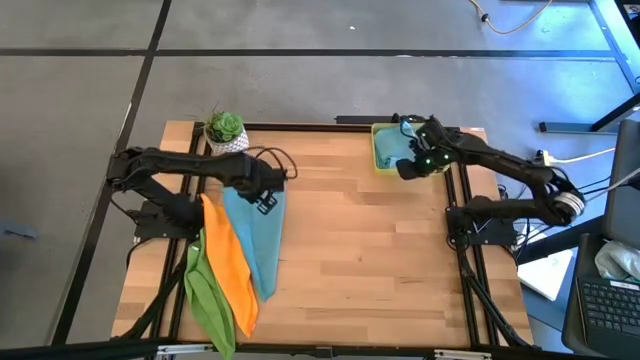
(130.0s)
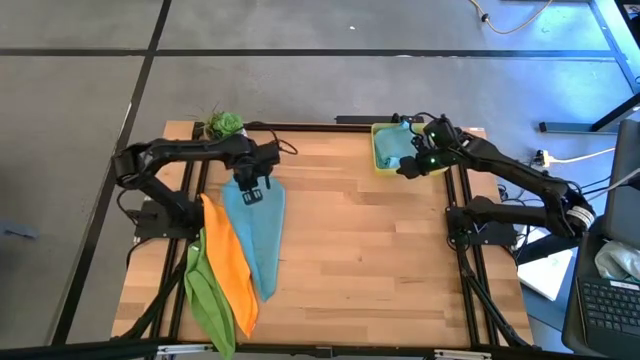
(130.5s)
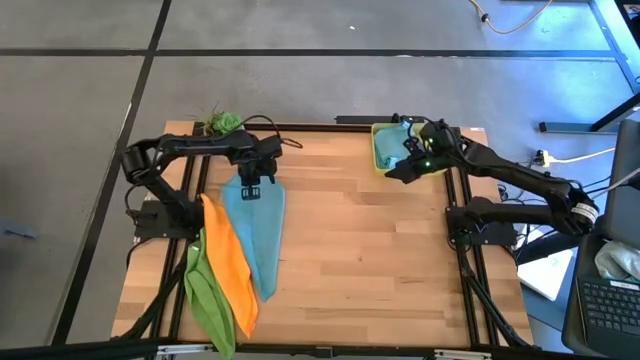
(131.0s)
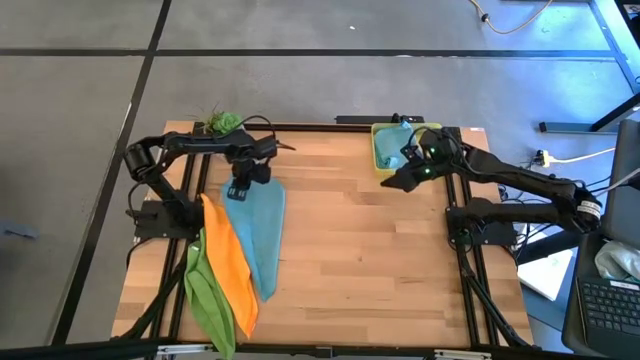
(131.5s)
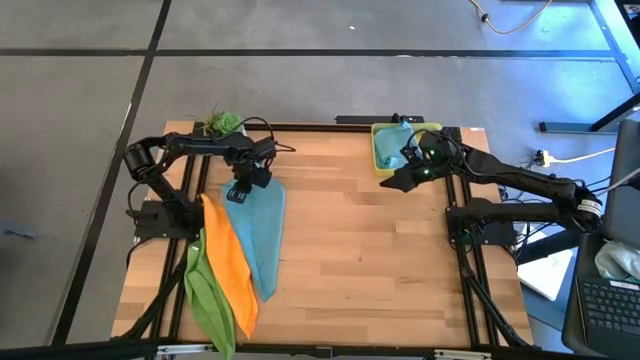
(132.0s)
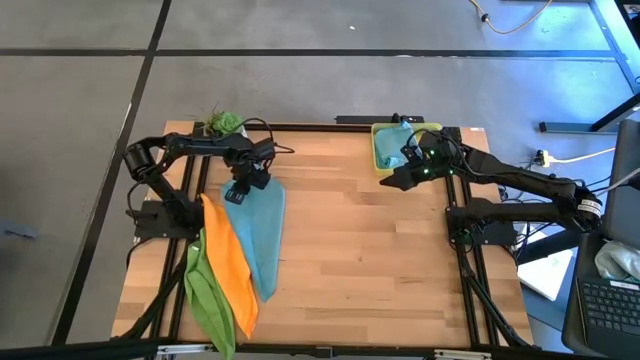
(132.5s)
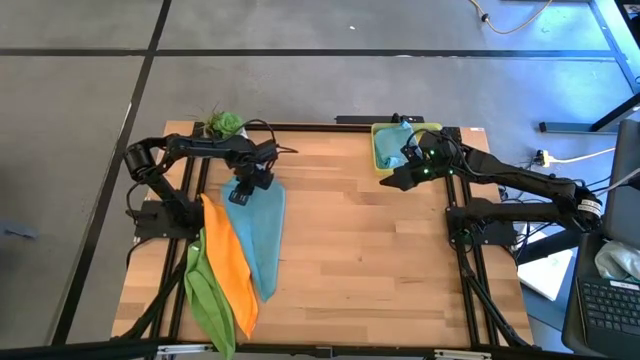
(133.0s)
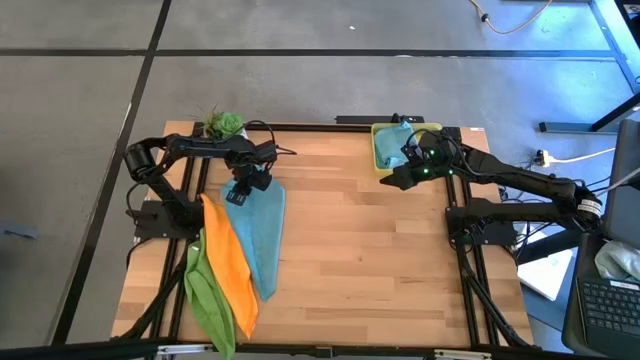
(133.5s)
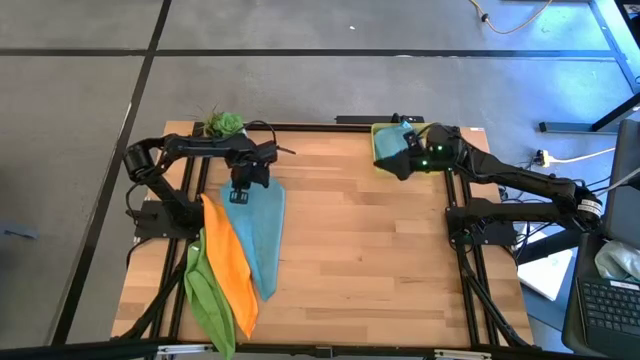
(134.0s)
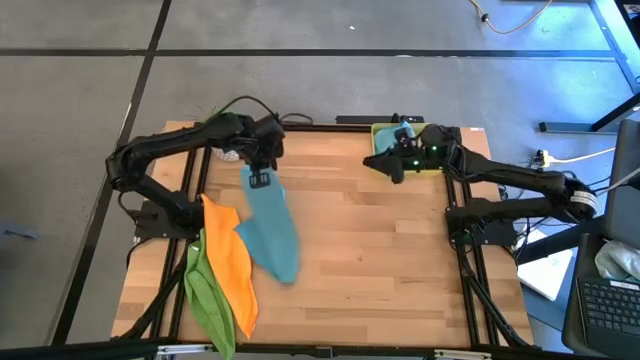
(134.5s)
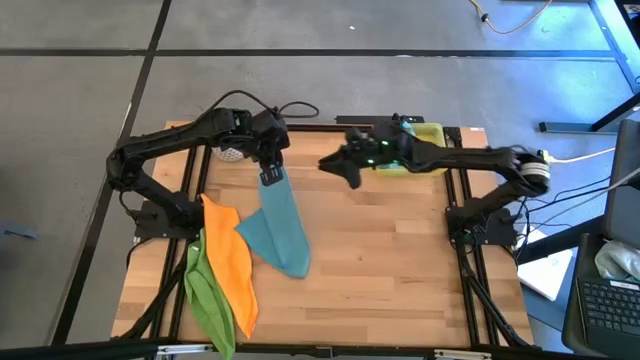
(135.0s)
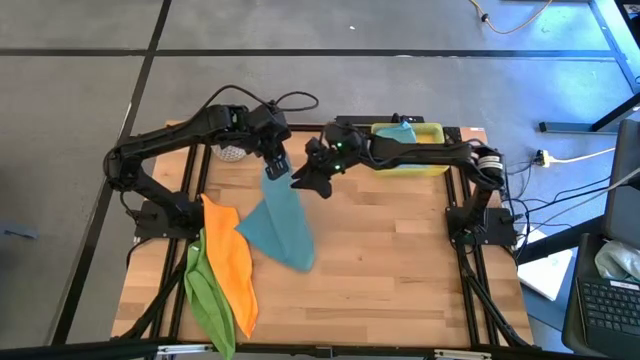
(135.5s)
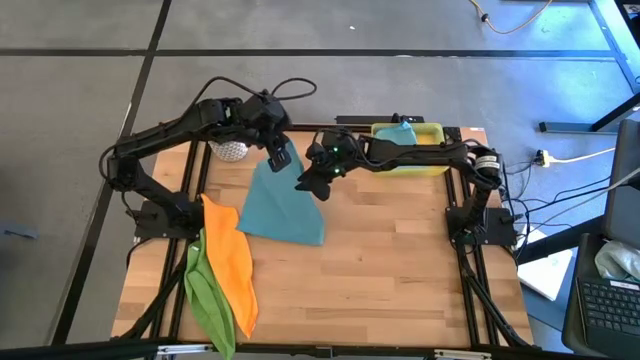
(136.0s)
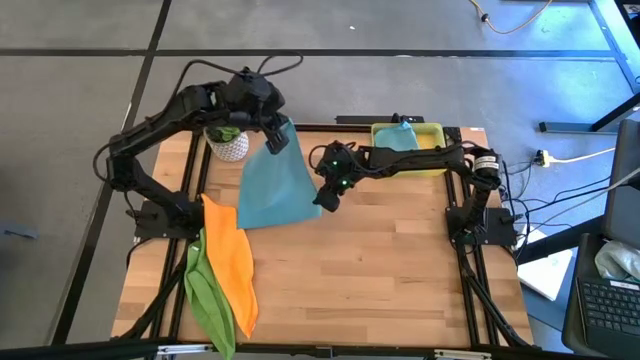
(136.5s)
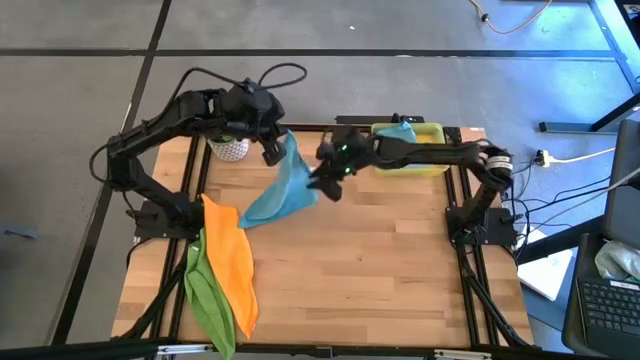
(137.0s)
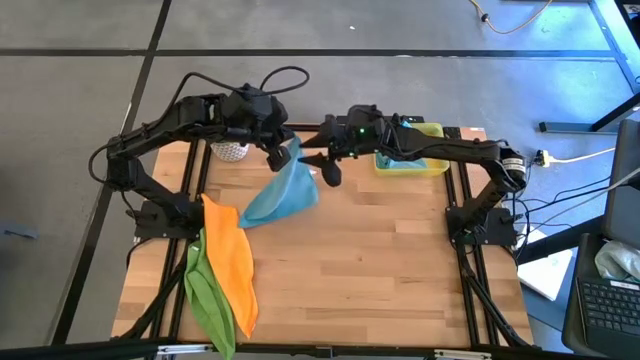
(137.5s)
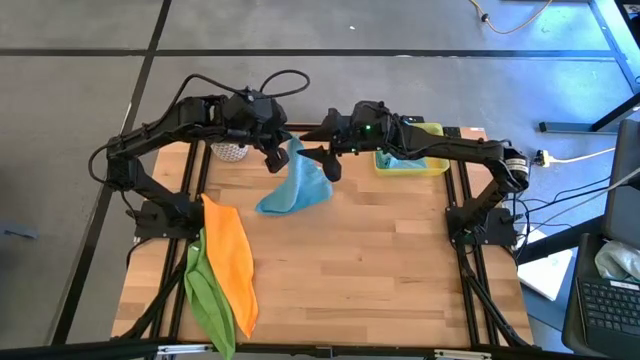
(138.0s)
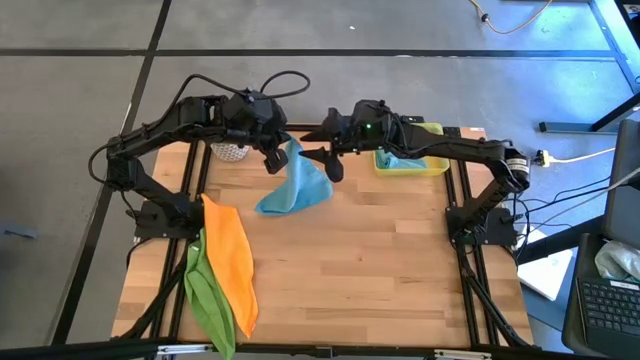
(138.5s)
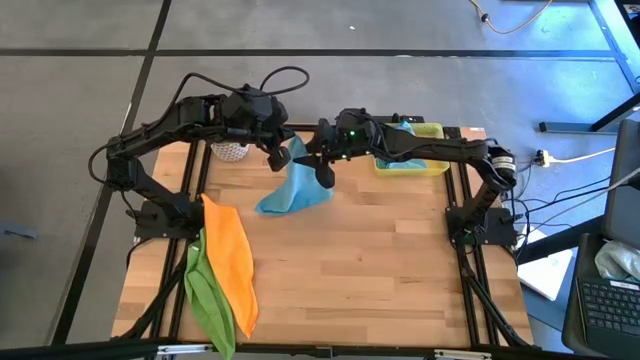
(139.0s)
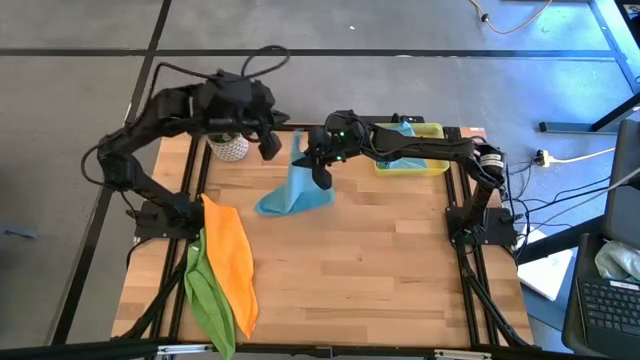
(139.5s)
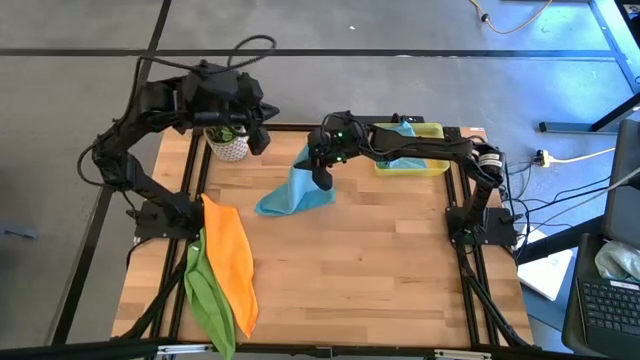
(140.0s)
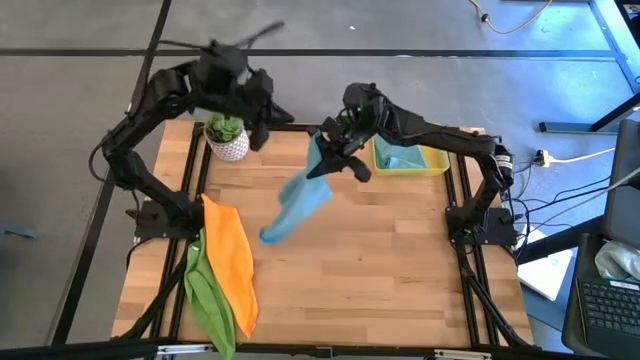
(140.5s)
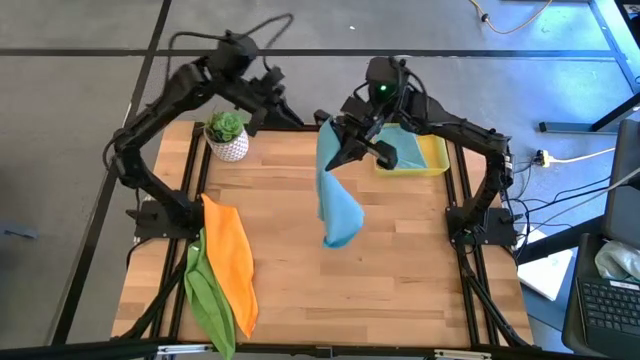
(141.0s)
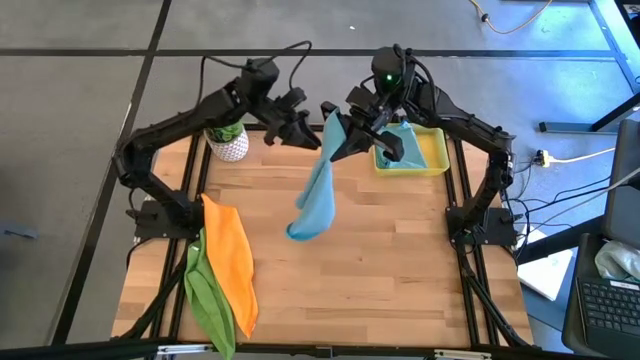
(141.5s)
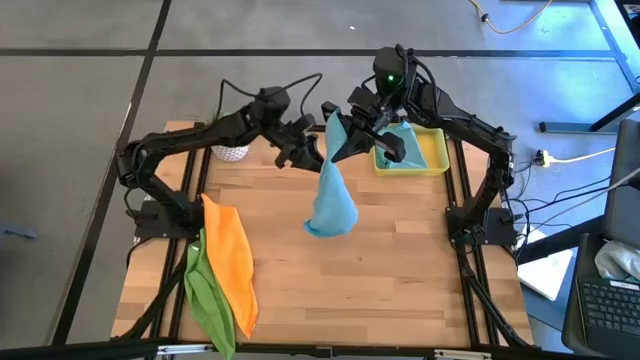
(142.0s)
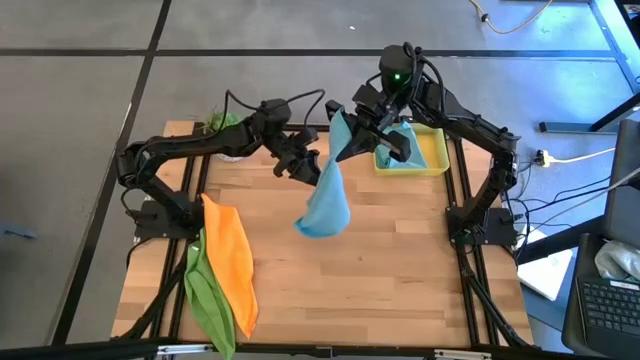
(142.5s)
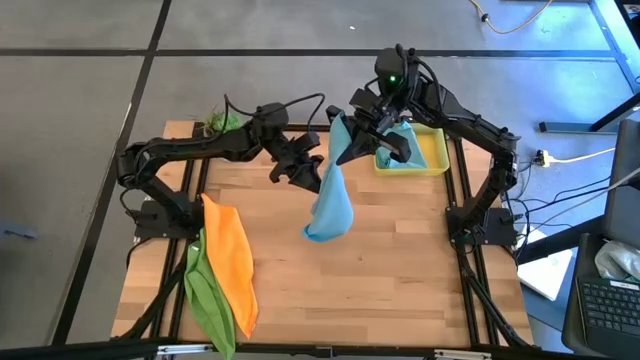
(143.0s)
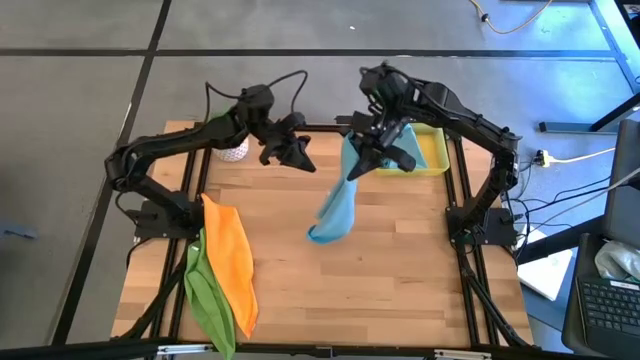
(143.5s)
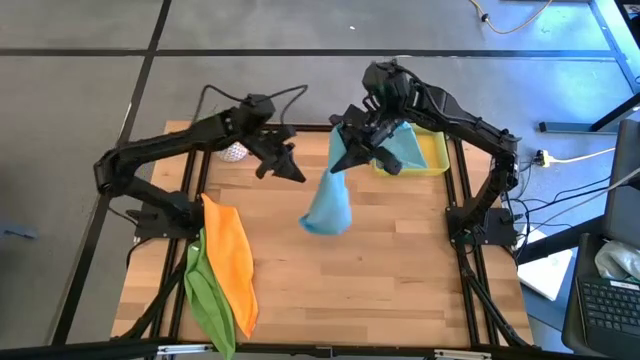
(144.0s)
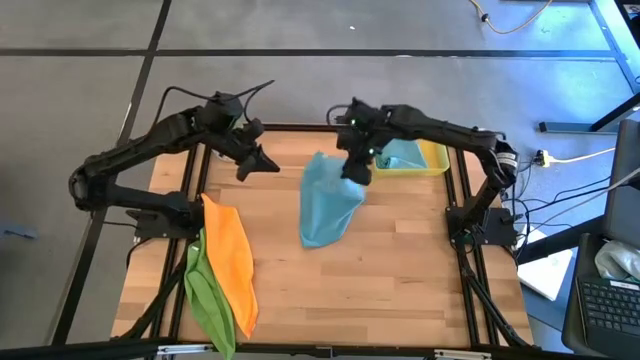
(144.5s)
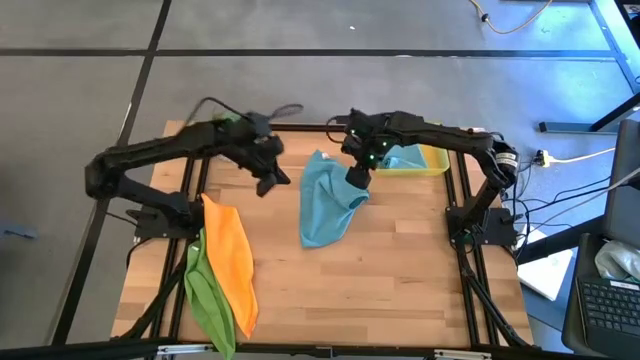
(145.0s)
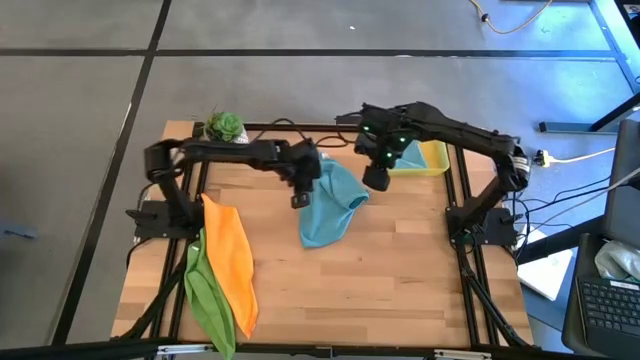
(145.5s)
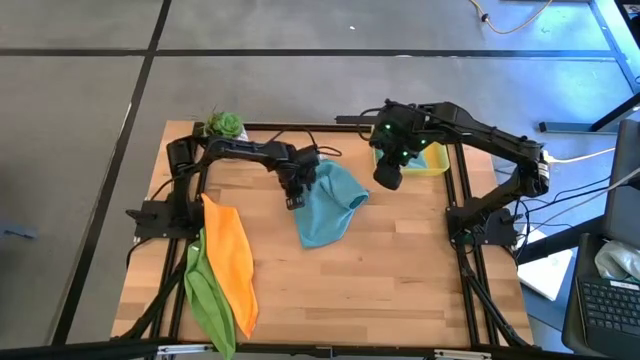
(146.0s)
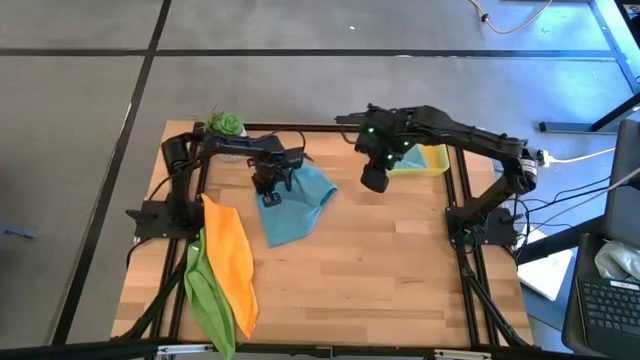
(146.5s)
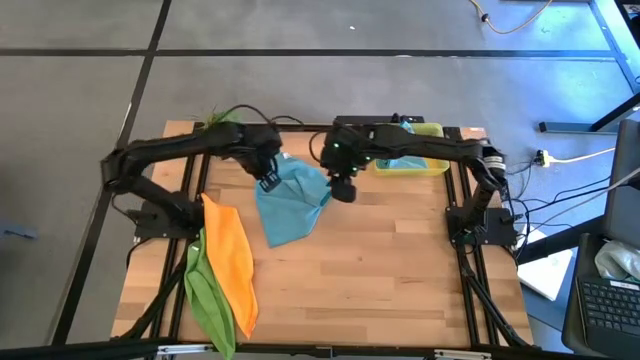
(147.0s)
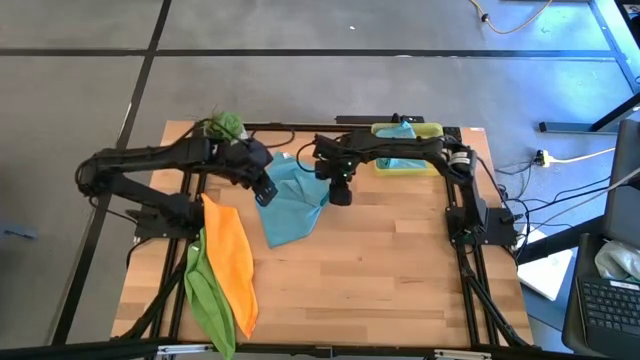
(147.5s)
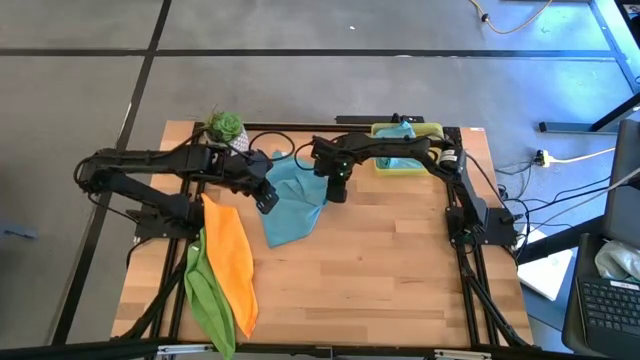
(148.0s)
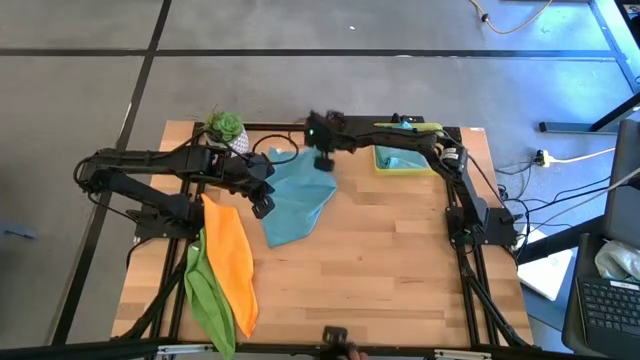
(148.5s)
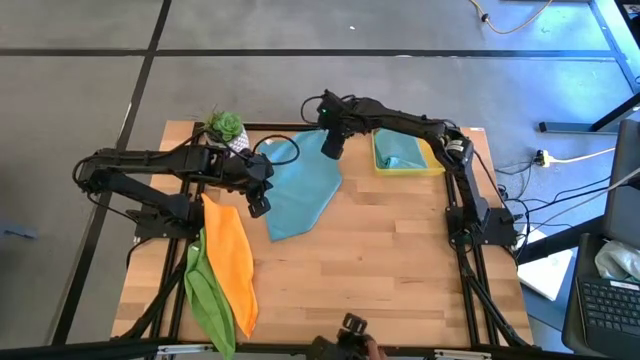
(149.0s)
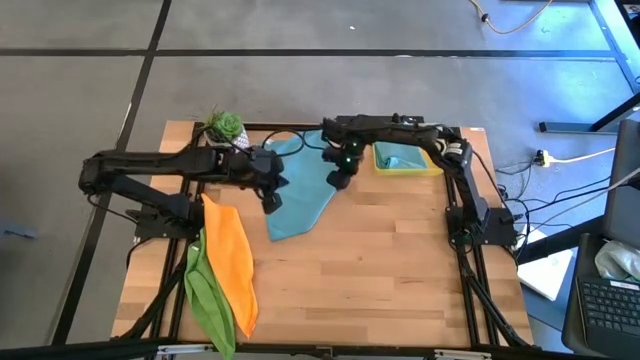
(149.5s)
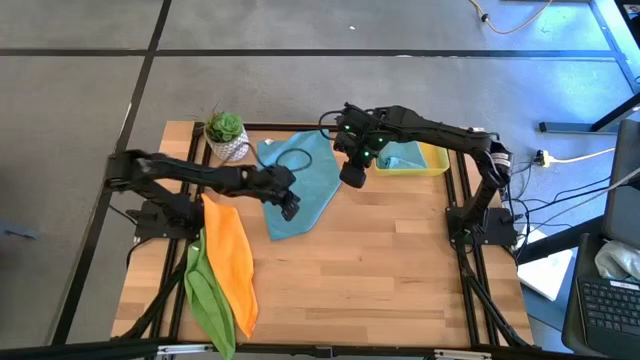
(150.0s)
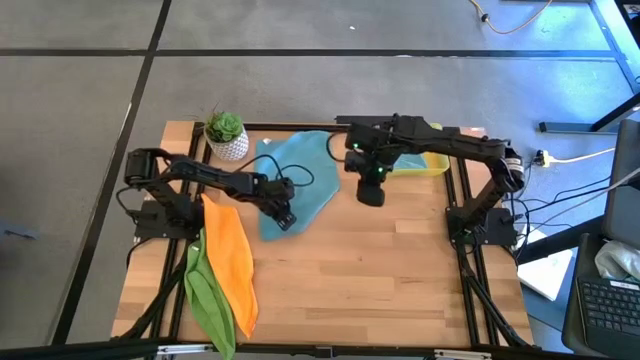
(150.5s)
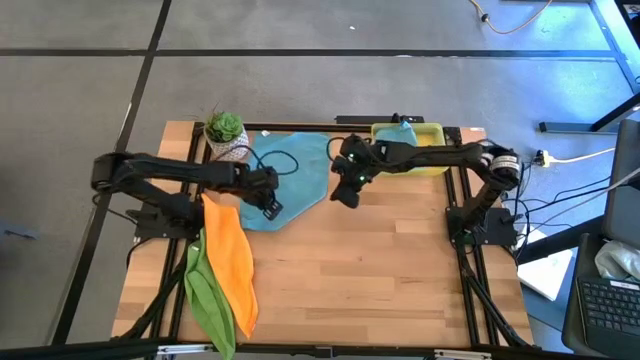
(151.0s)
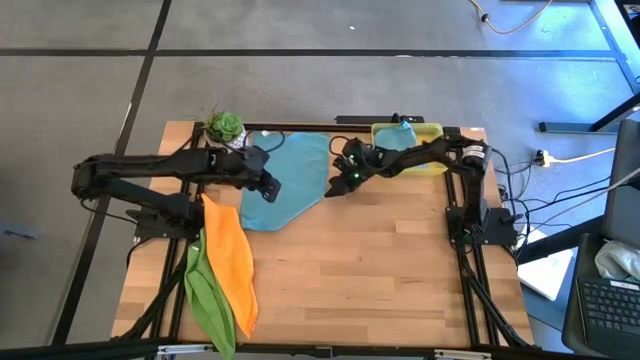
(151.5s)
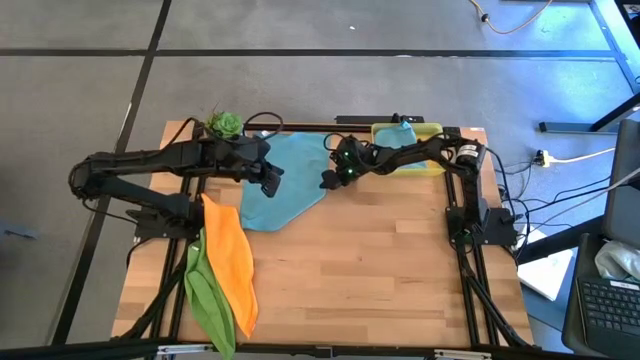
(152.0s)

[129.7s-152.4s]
Task: Fold microfiber towels
Fold the right blue microfiber towel
